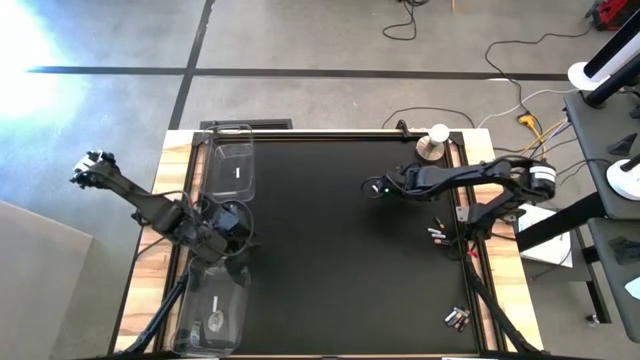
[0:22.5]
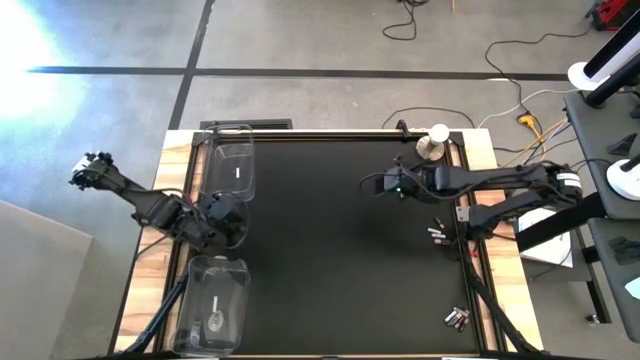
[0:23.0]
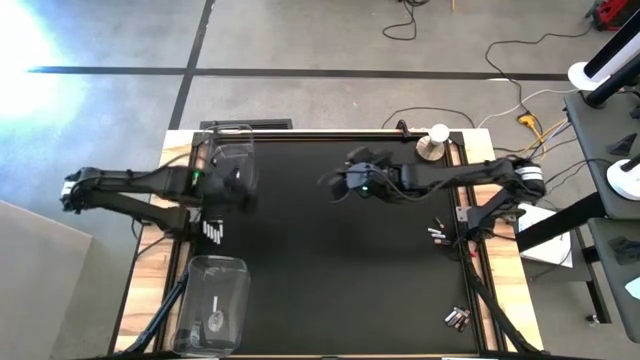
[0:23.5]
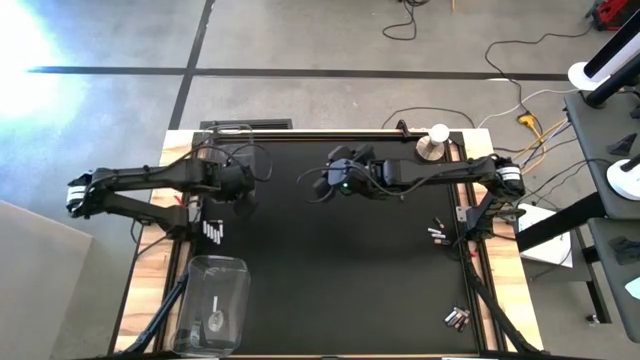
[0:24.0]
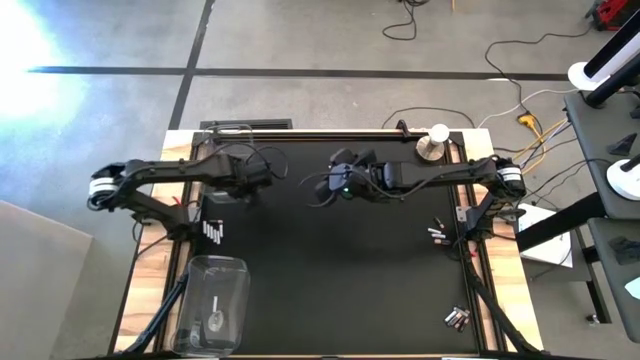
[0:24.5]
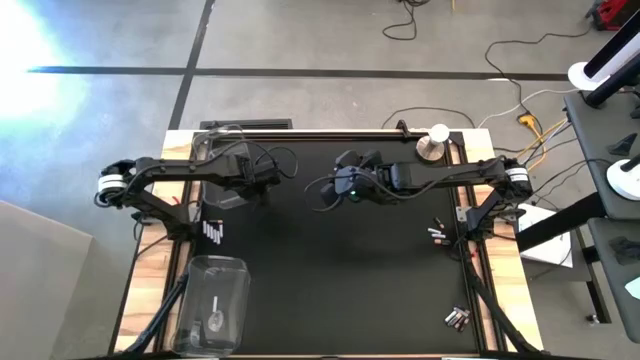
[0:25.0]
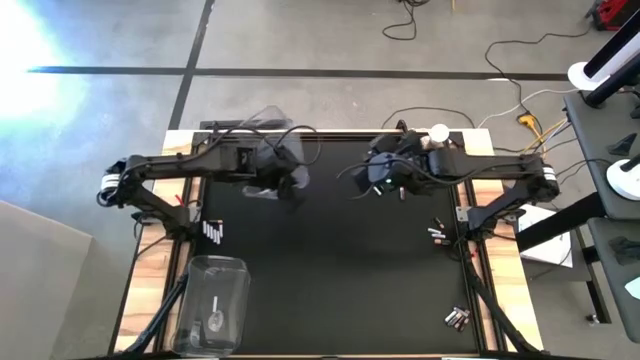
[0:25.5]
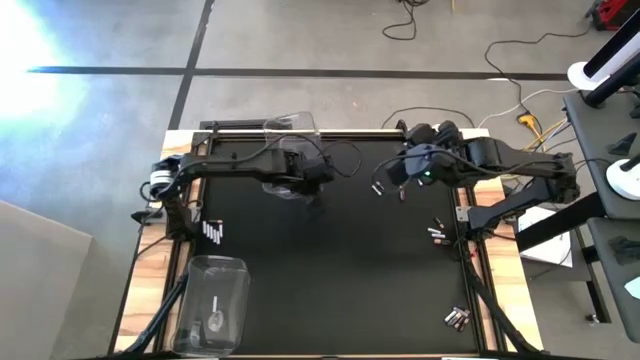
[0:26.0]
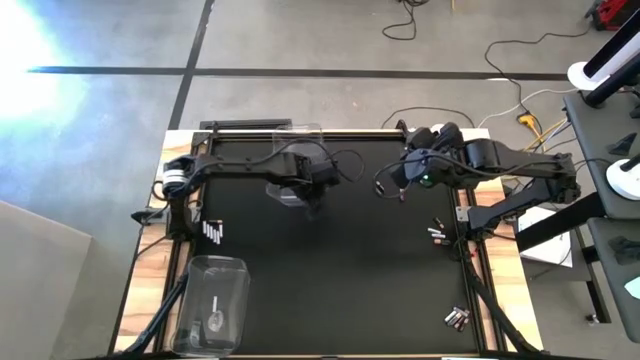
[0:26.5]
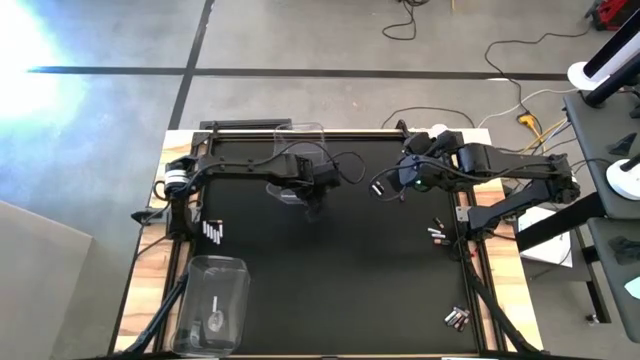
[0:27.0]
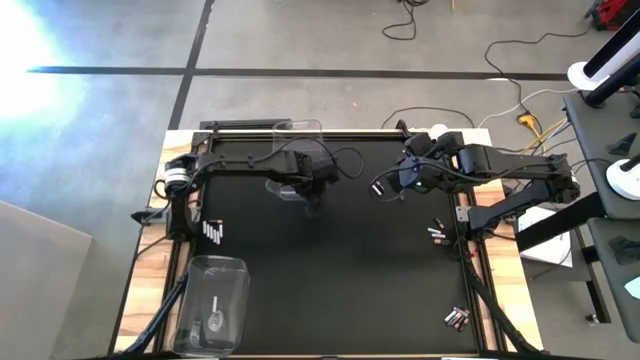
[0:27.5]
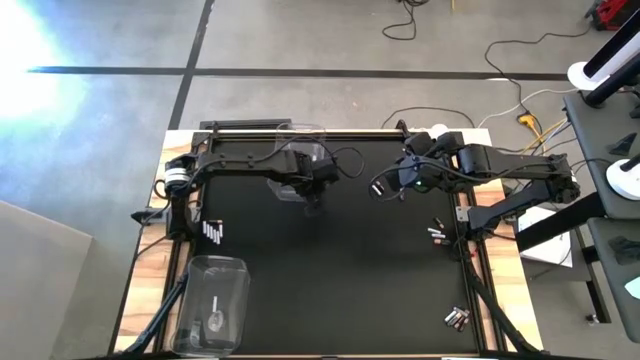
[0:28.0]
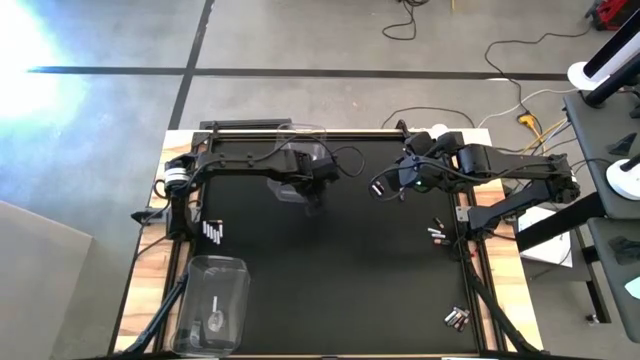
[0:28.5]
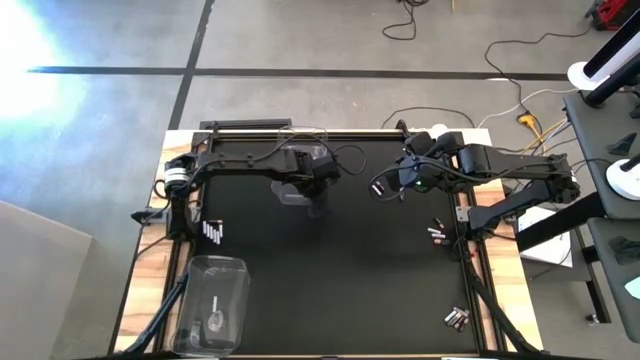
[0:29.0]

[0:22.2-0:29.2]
Task: Sort batteries
Move the top transparent bin to the top center of the table

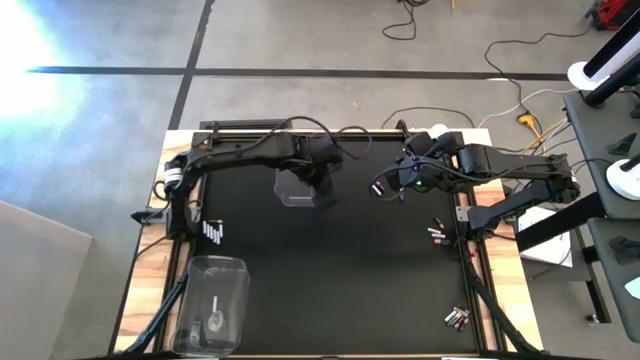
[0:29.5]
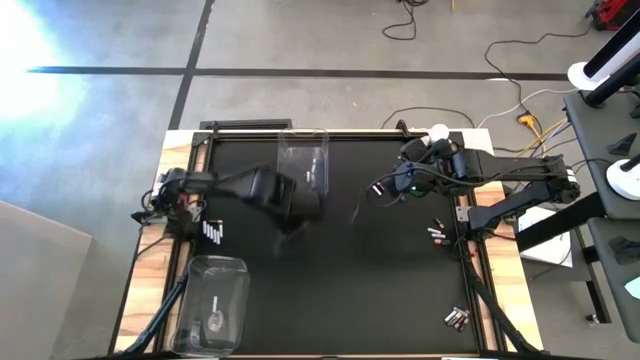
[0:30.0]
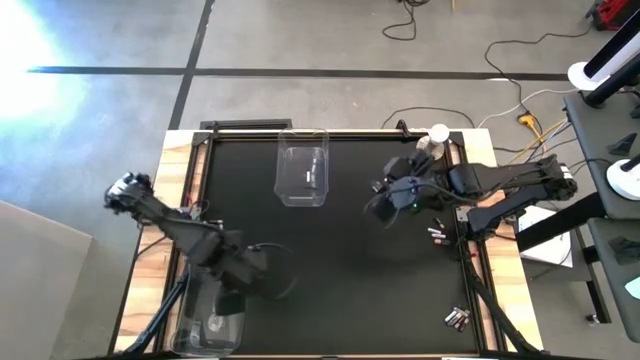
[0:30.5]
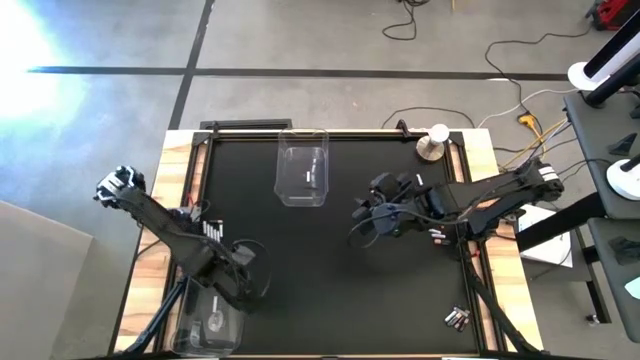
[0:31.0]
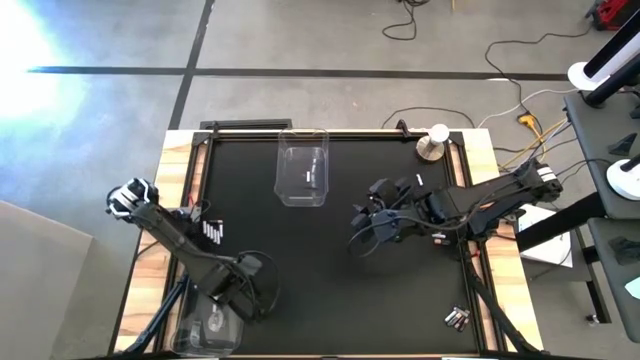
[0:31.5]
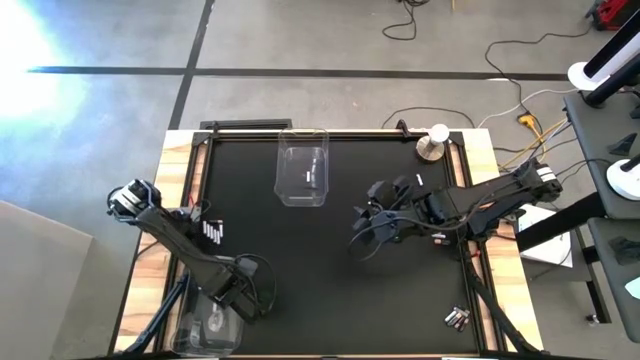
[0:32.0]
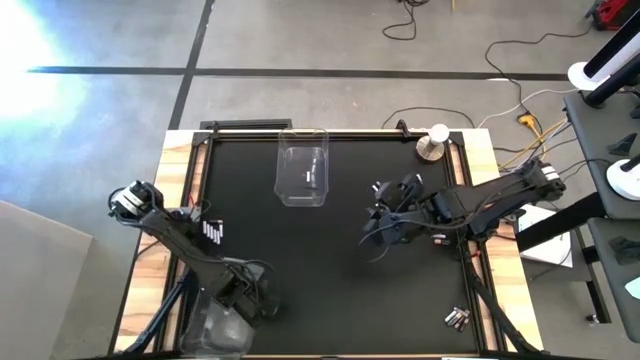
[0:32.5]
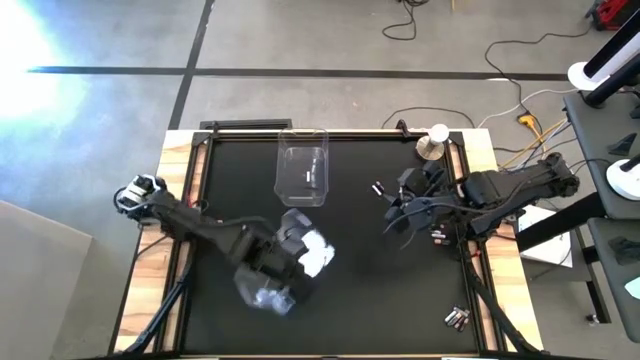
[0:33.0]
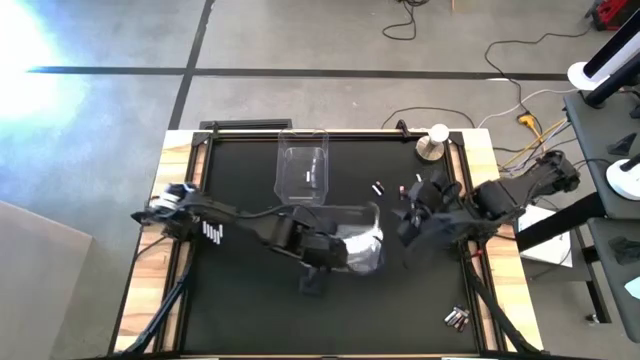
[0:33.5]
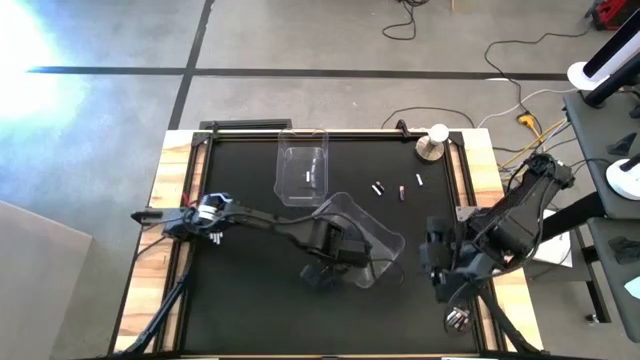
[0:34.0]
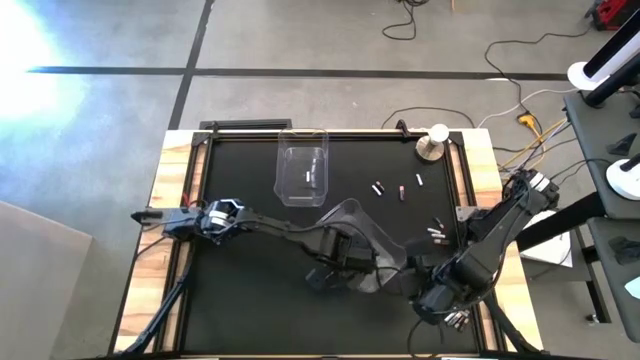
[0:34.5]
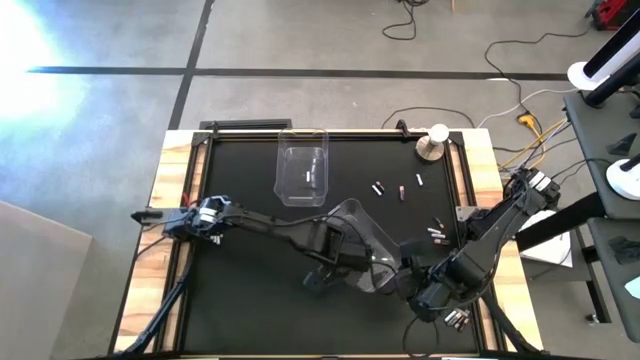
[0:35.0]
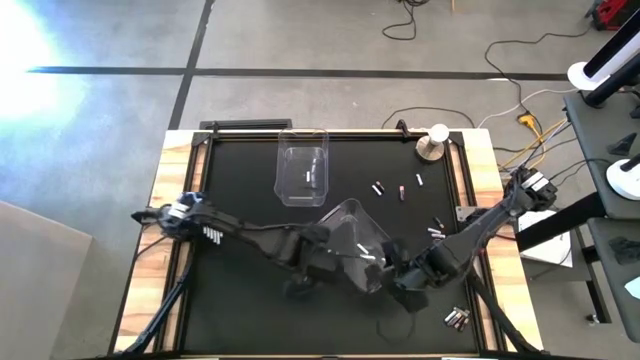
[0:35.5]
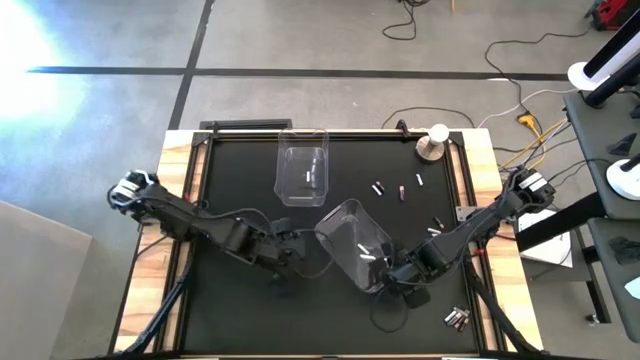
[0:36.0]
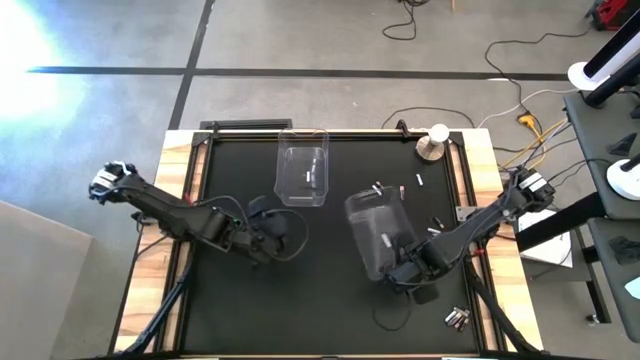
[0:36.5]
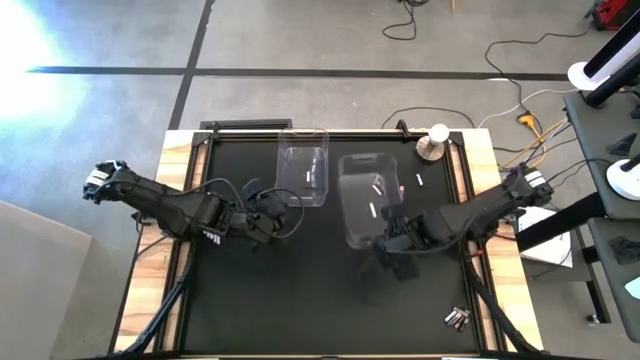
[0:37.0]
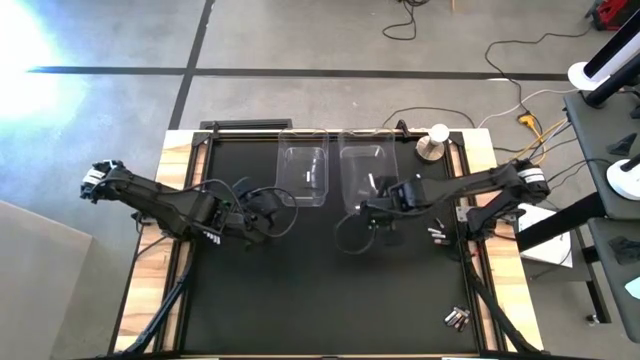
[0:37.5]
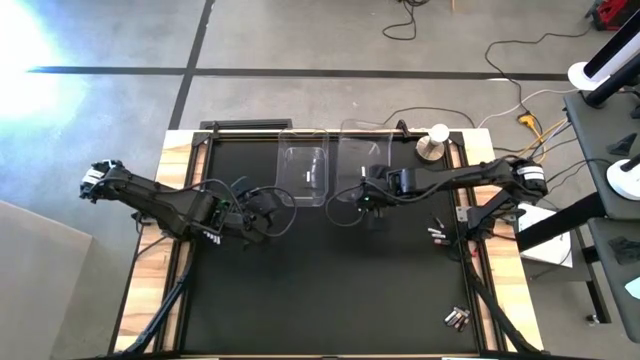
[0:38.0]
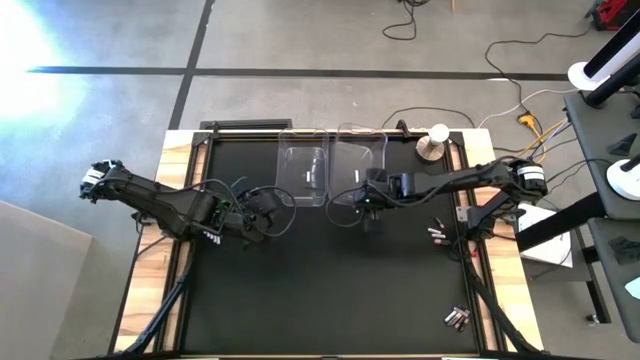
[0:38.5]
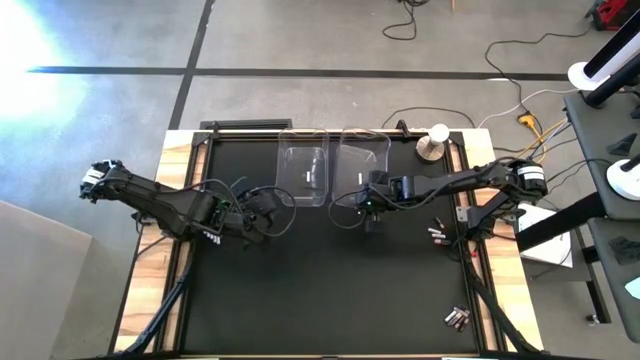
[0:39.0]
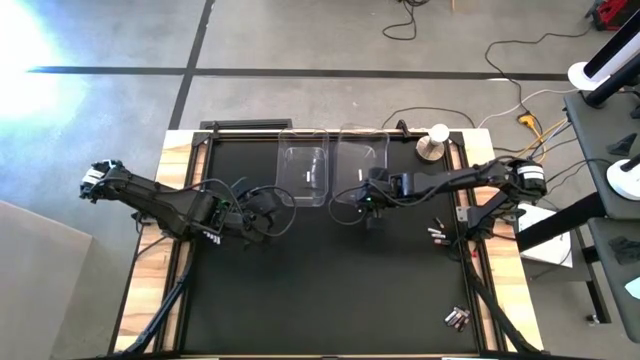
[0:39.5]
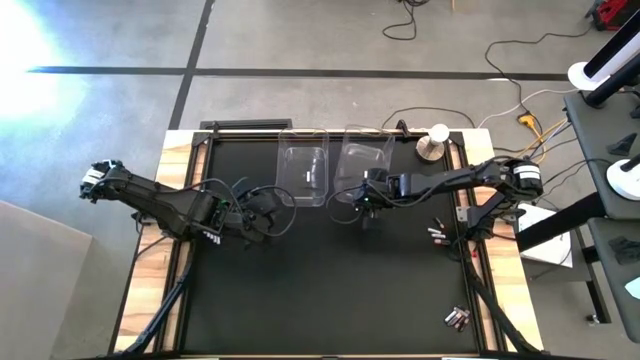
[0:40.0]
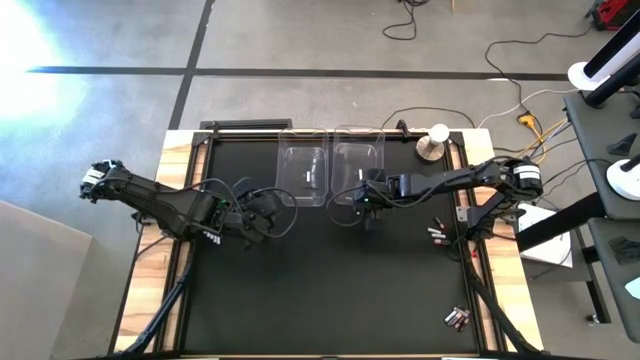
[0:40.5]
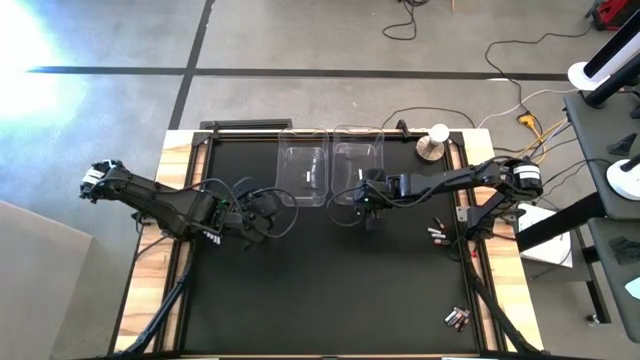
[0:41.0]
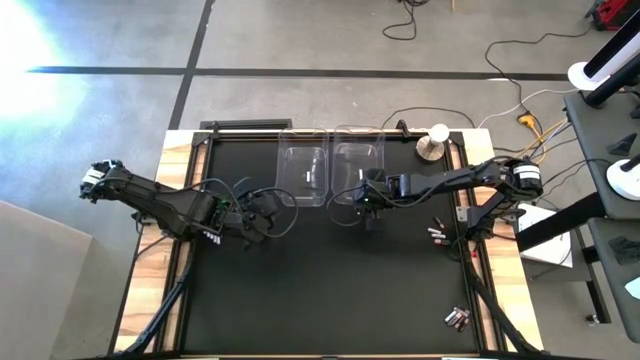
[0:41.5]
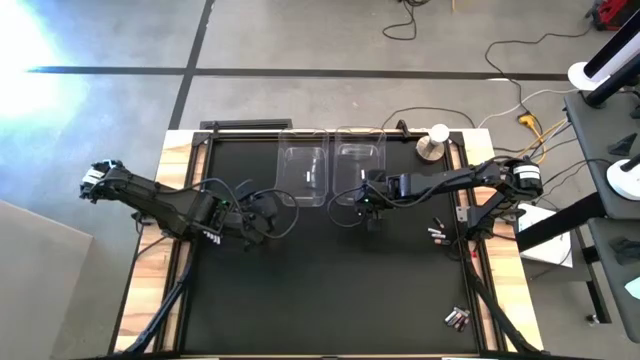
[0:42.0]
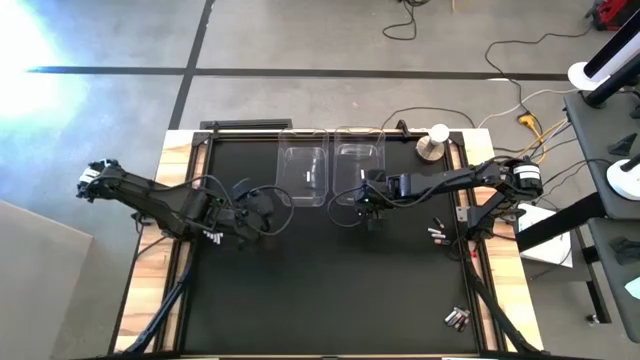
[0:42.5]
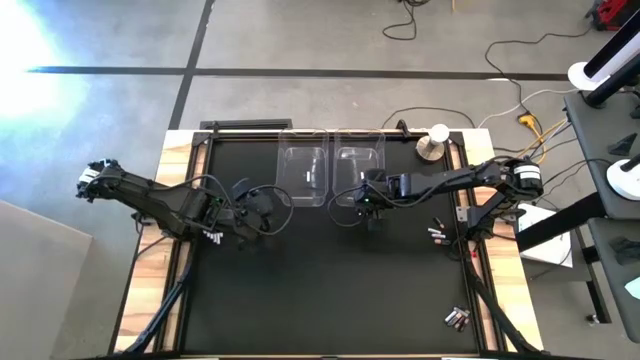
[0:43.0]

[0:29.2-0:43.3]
Move the bottom transparent bin to the right side of the top transparent bin

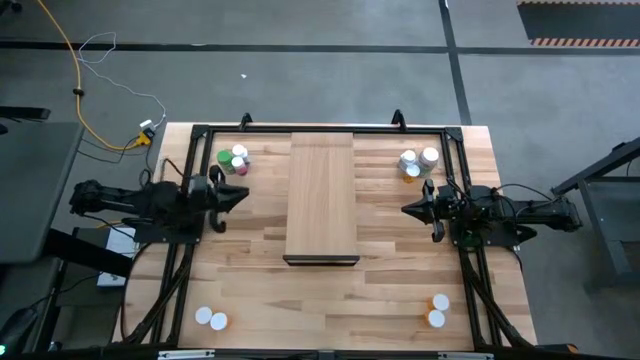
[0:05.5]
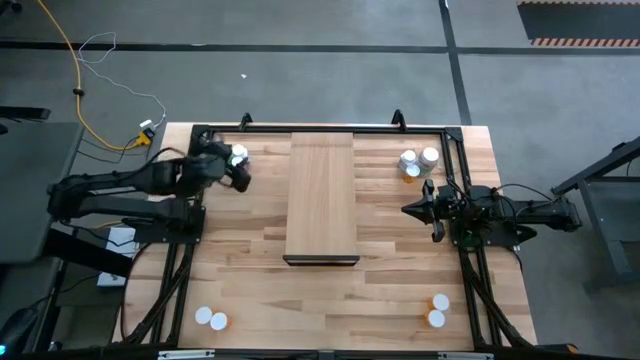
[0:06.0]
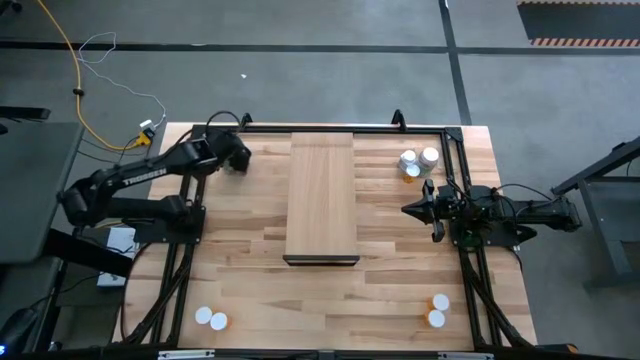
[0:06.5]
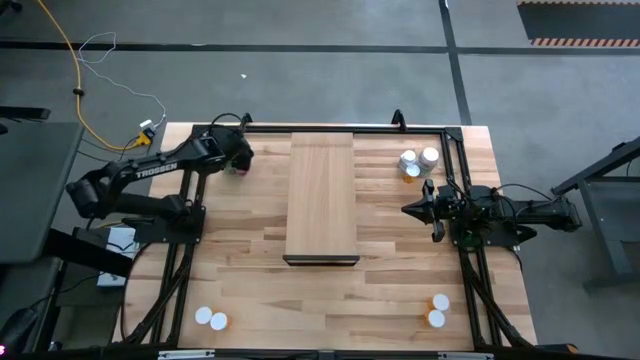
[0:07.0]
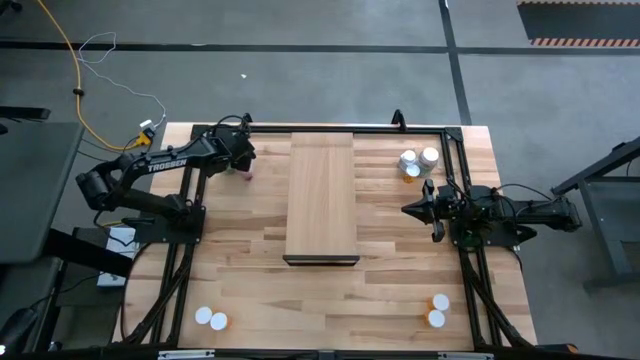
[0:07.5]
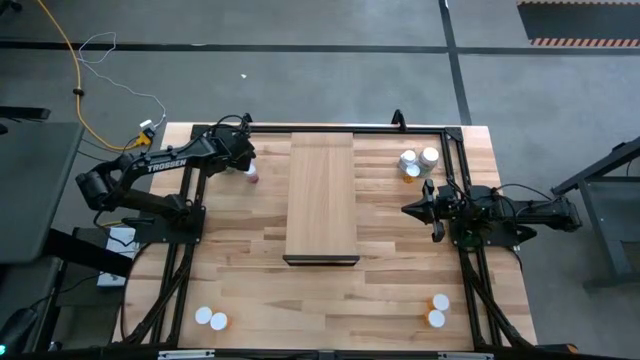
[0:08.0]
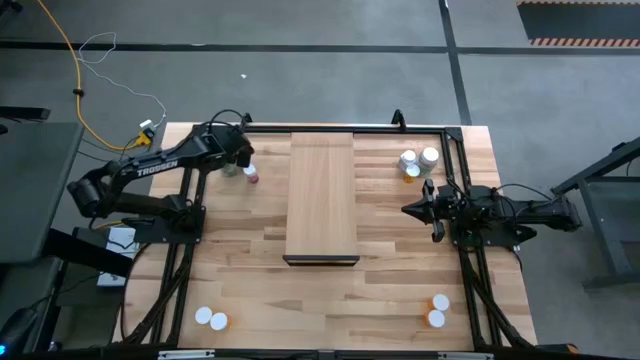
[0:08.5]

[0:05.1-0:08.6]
Task: Pick and place medicine bottles onto shelf by color
Put the green pill bottle on the shelf
